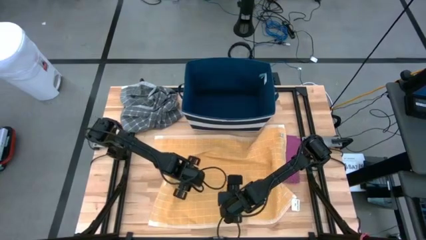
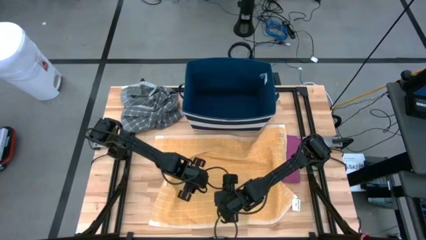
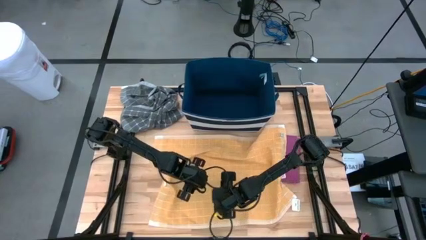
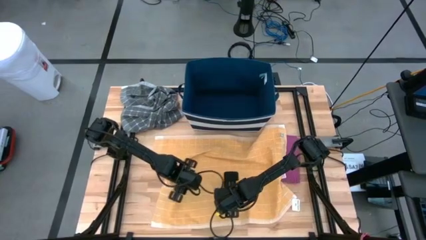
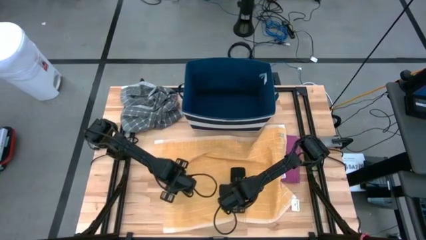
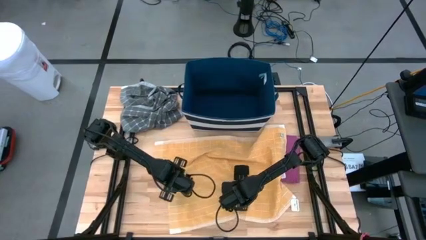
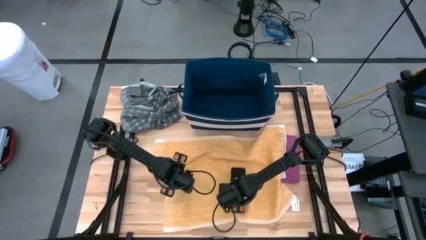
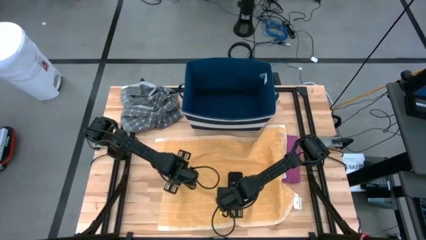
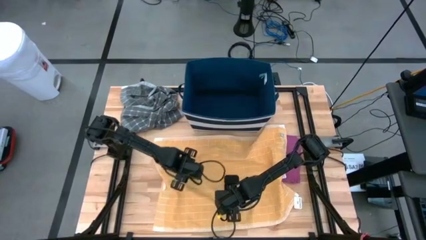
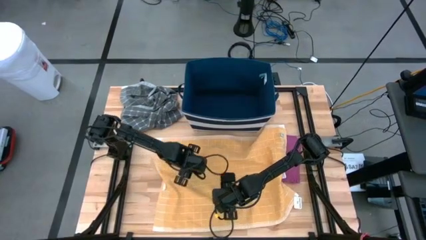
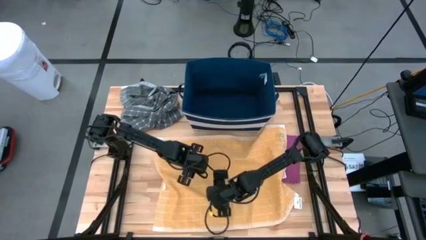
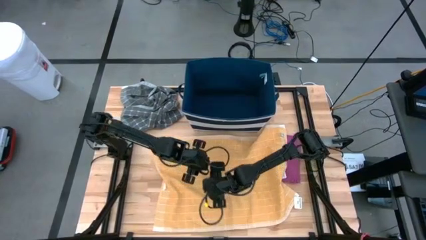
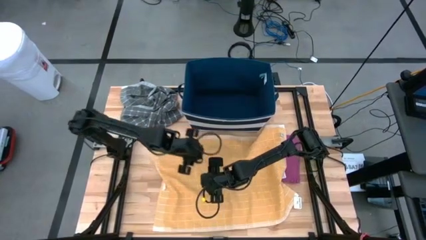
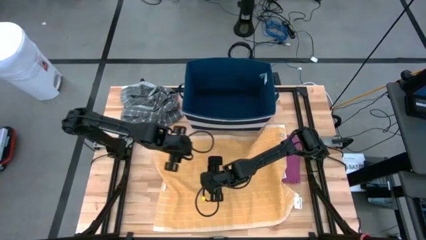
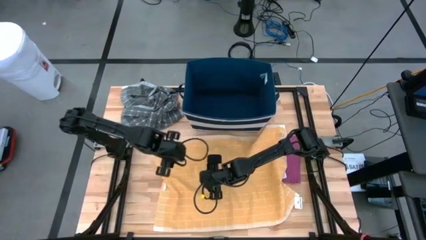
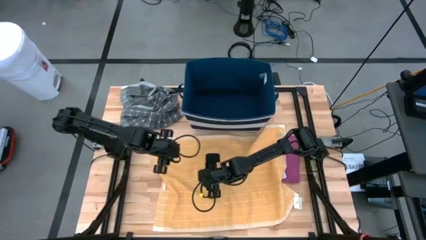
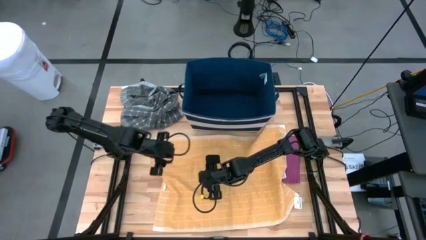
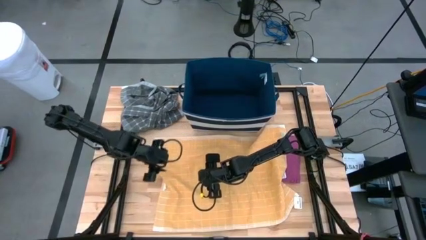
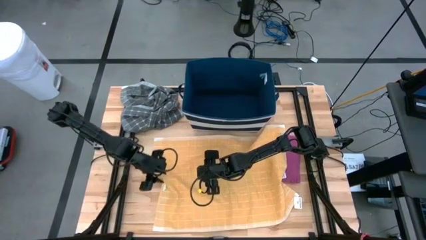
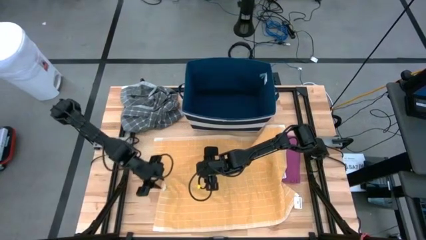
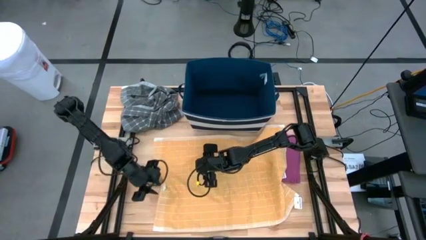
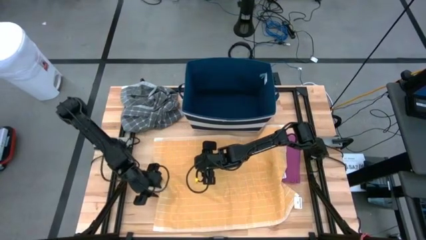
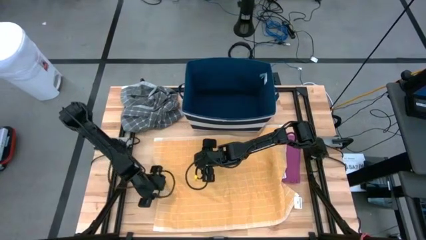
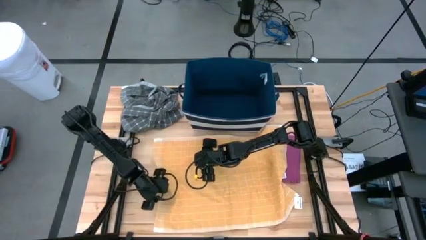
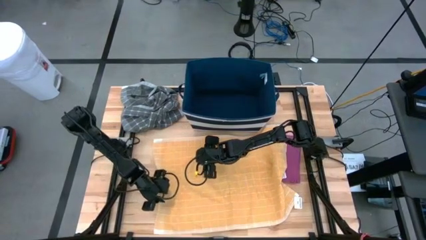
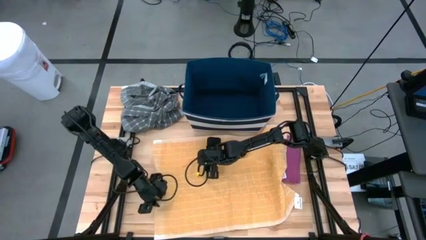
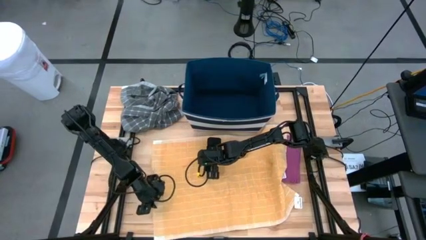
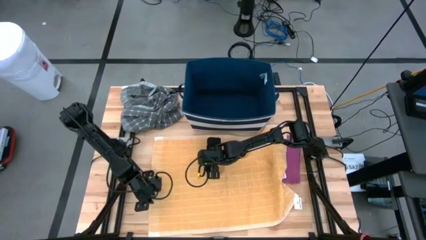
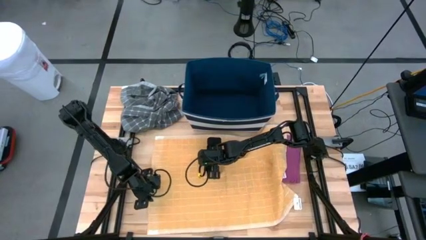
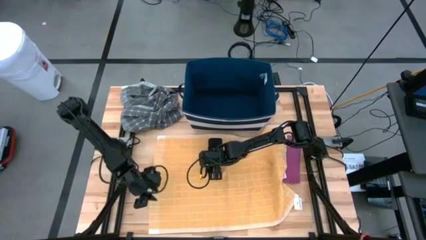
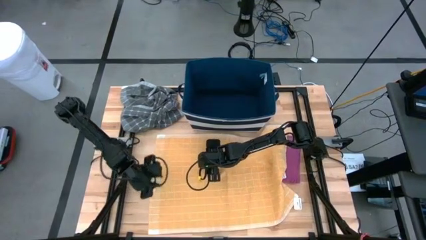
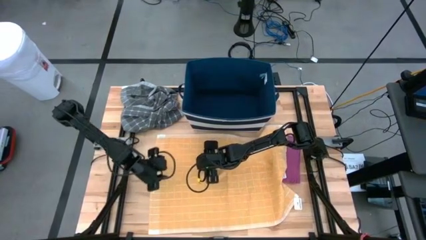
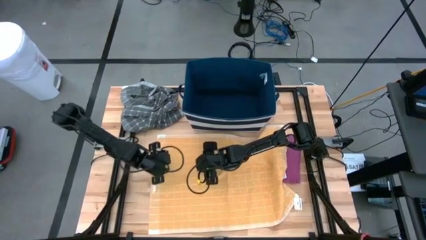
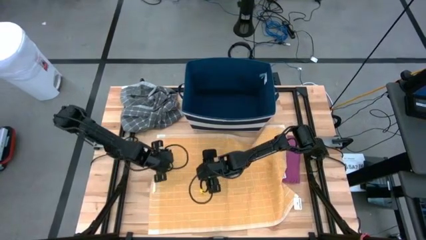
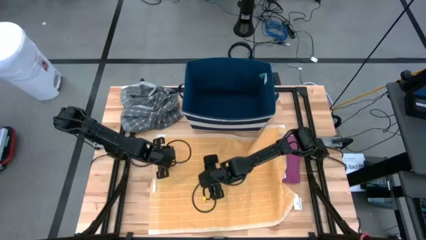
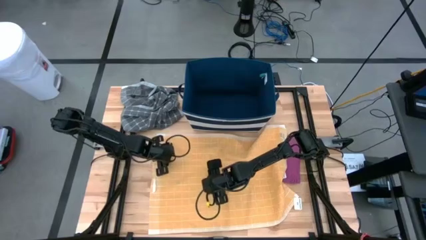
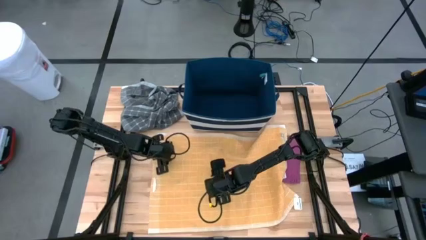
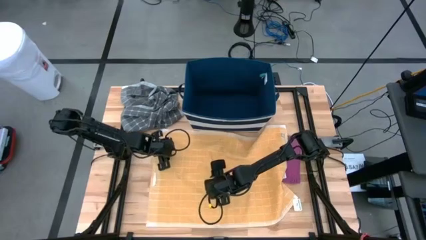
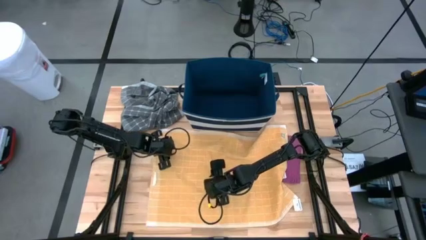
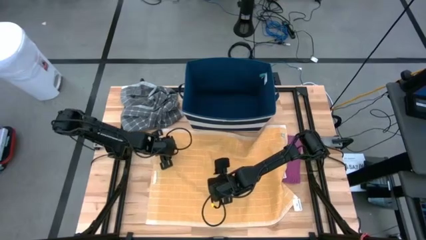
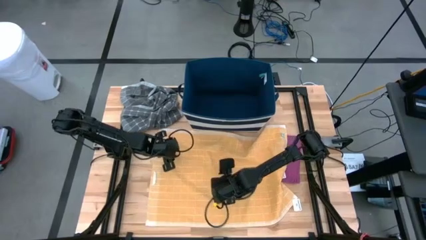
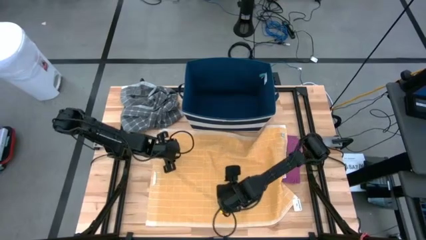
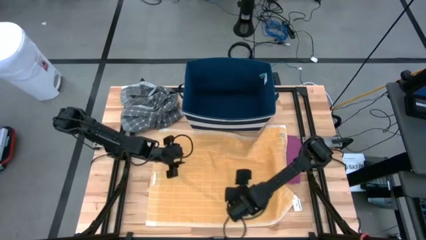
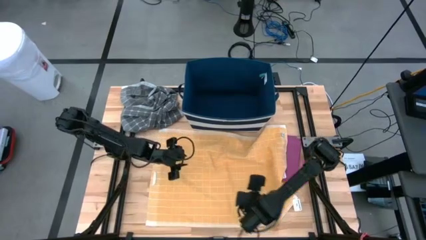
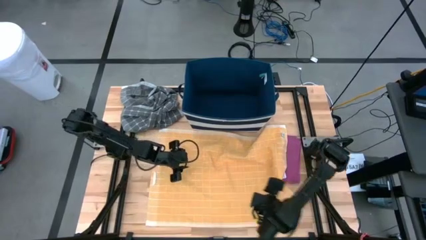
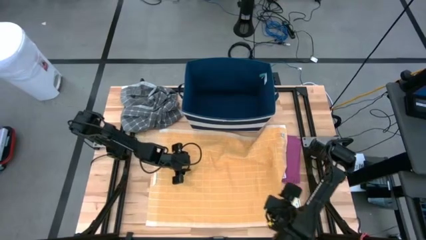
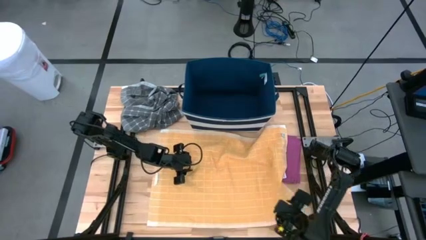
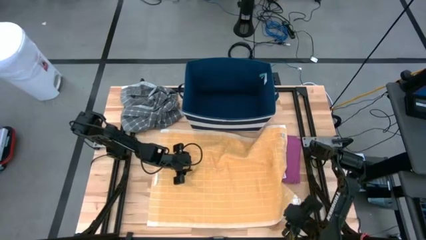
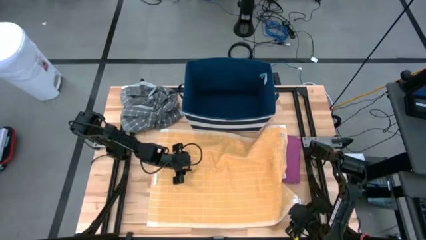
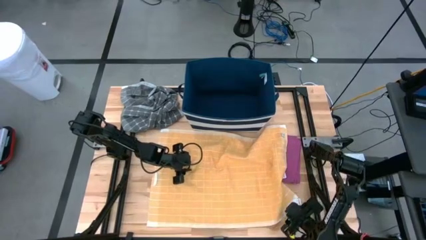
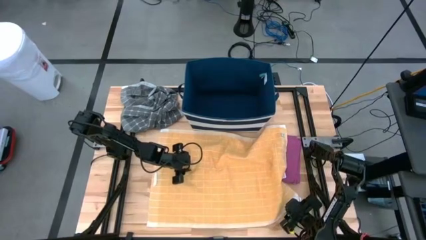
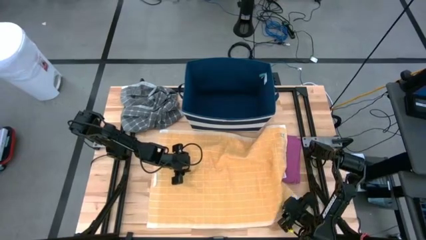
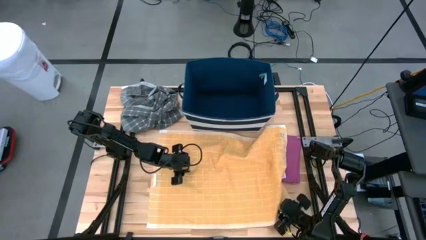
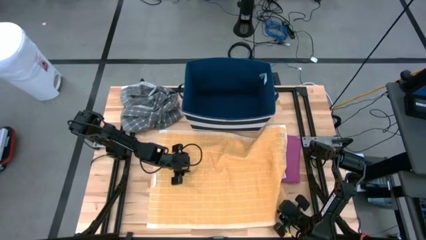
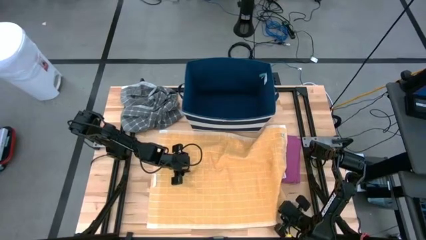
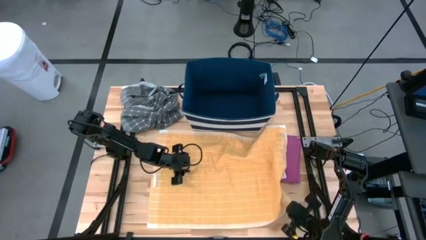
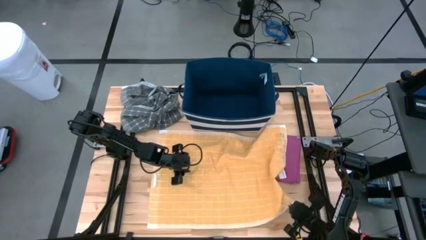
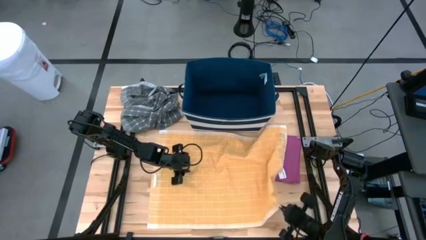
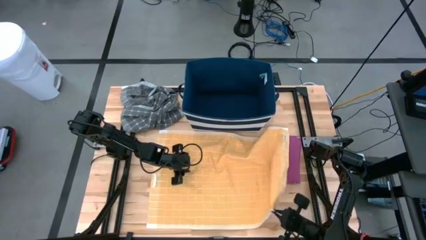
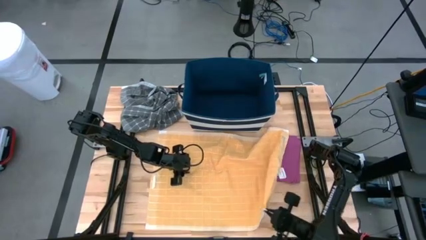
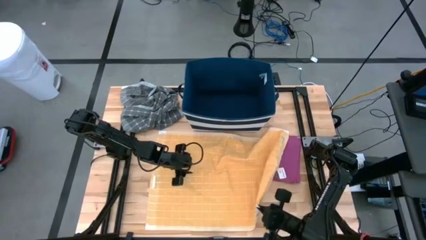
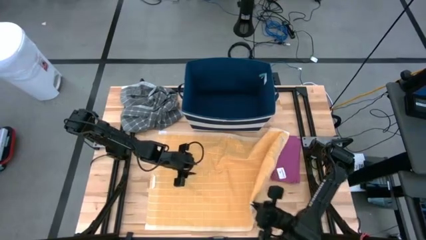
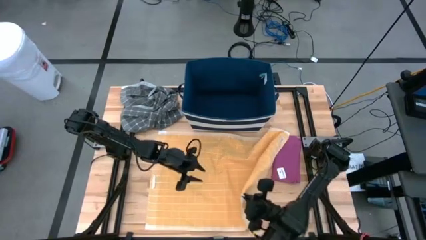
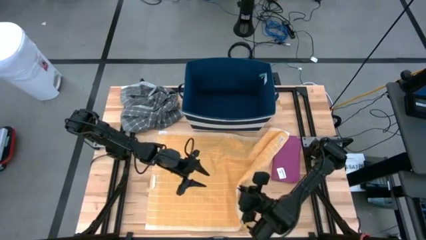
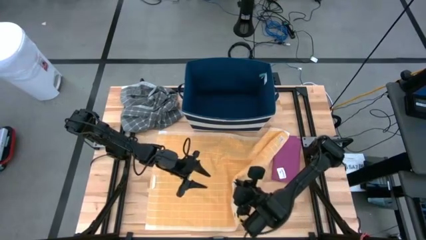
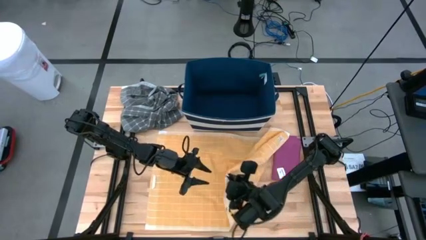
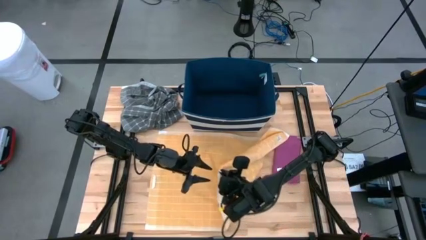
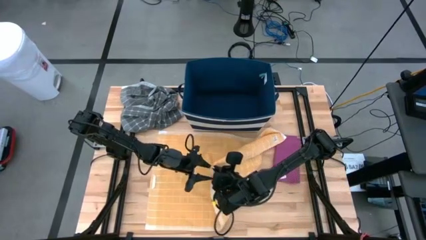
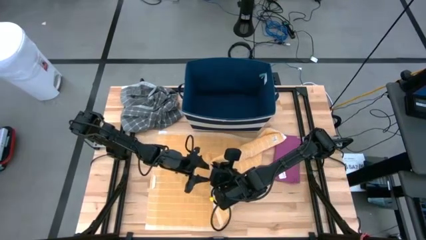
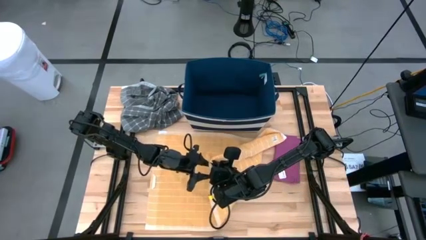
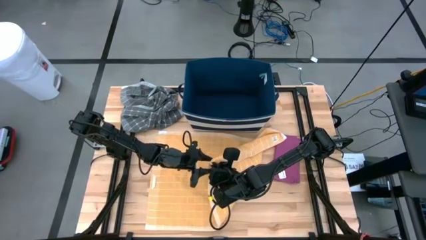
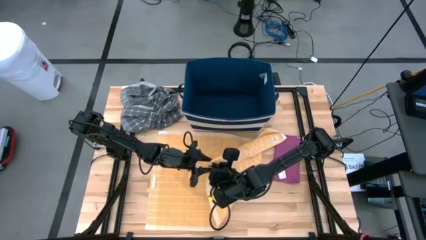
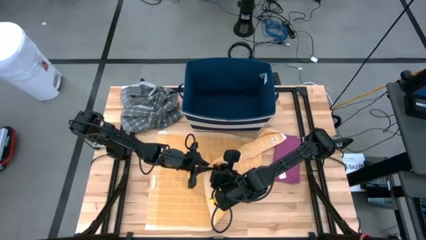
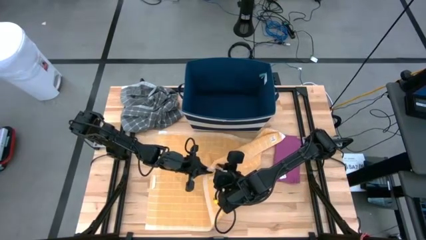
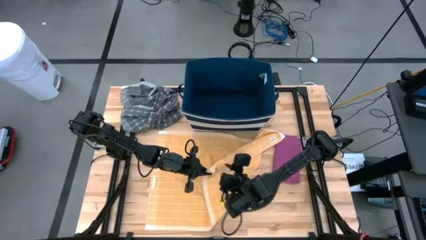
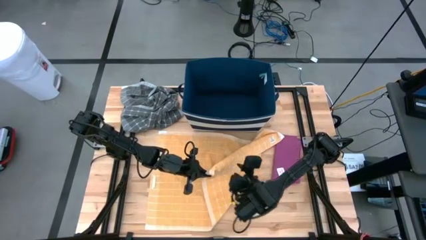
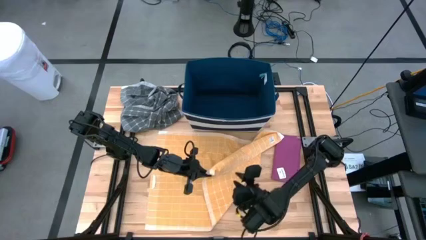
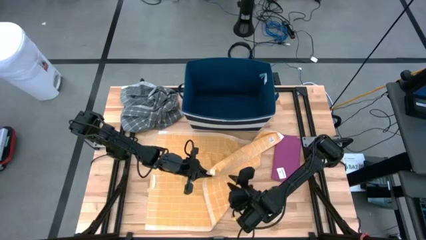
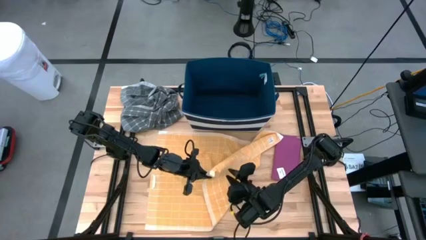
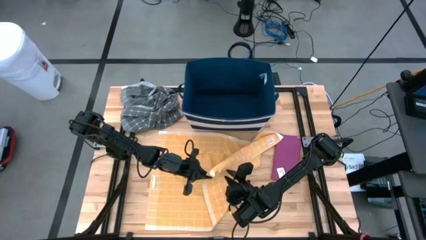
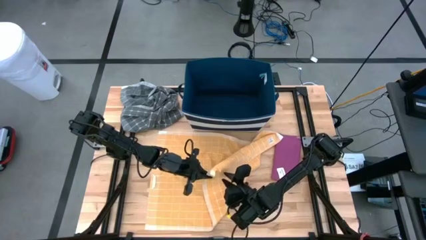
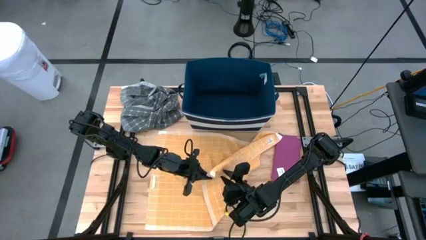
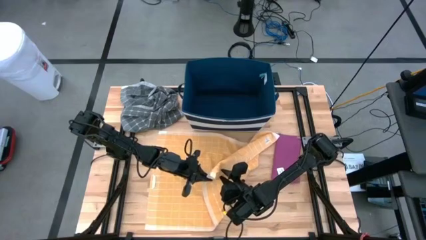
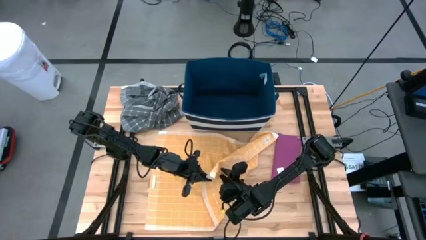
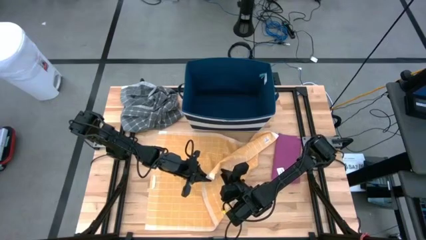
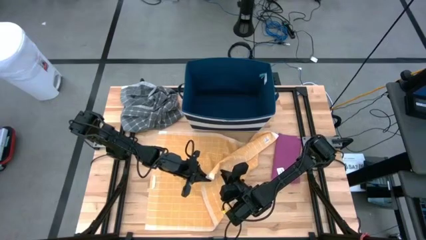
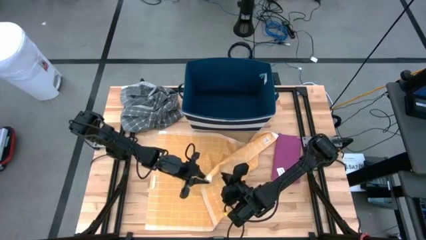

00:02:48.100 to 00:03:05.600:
Task: Fold towel
Fold the yellow towel
